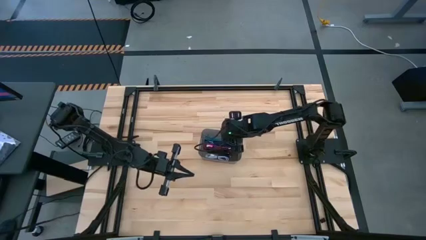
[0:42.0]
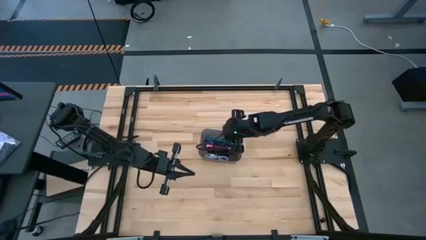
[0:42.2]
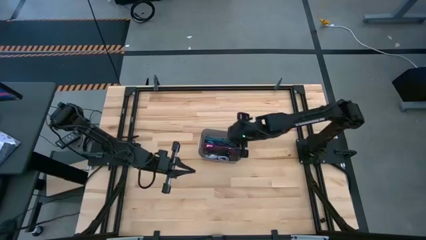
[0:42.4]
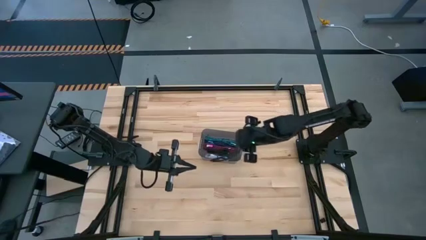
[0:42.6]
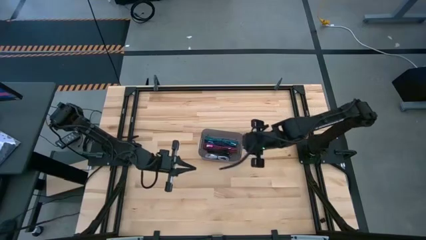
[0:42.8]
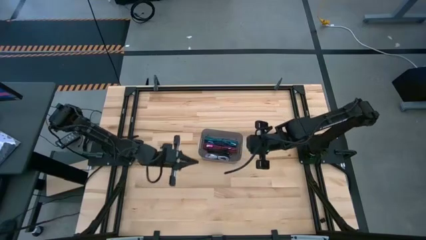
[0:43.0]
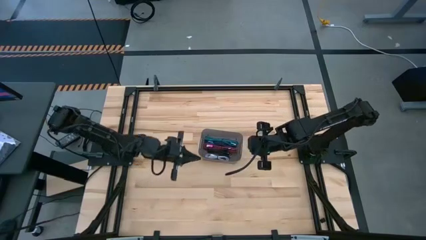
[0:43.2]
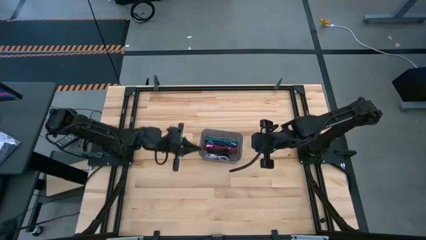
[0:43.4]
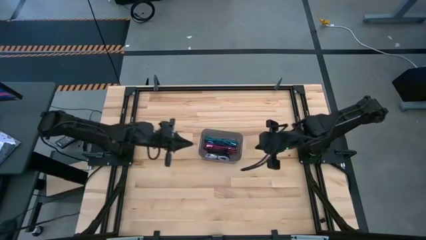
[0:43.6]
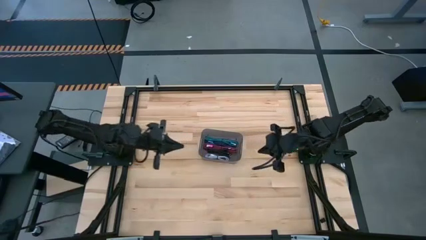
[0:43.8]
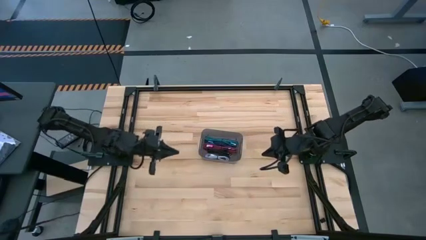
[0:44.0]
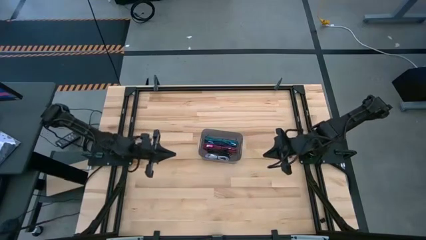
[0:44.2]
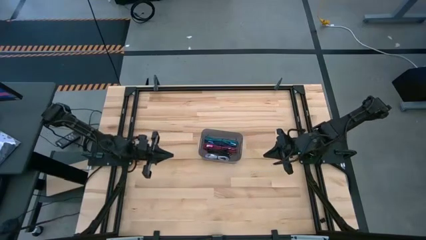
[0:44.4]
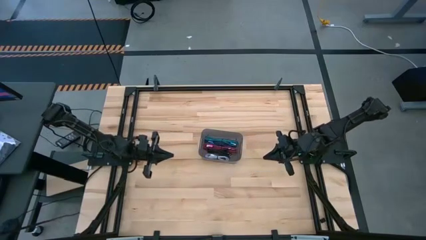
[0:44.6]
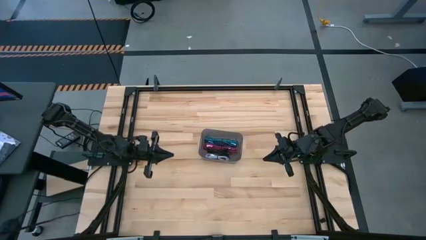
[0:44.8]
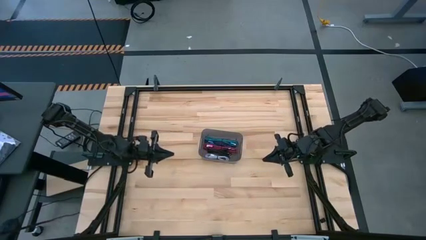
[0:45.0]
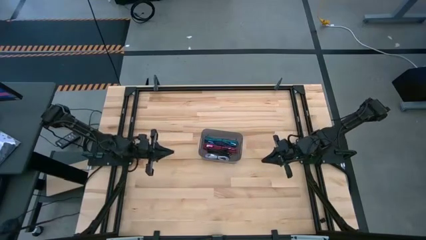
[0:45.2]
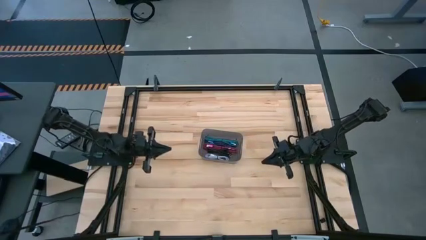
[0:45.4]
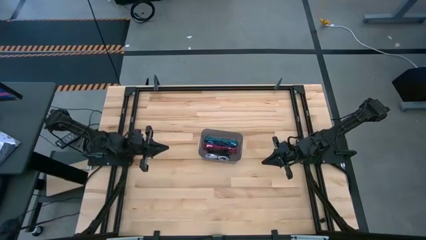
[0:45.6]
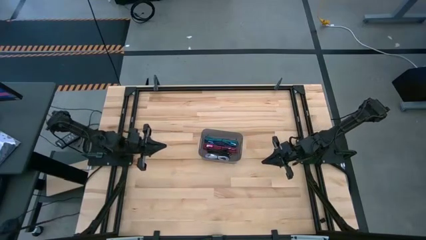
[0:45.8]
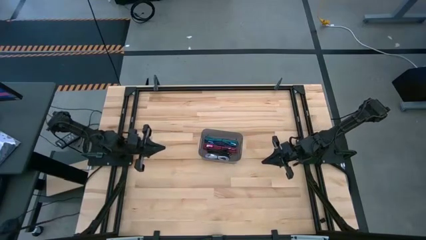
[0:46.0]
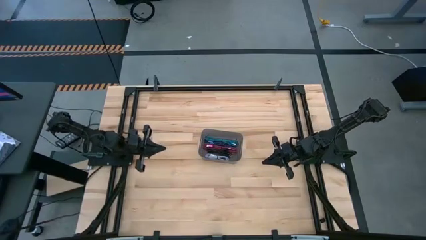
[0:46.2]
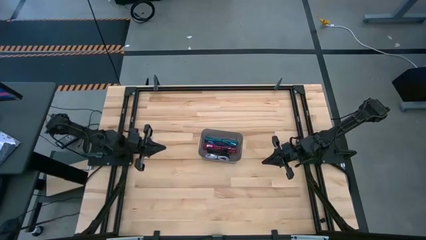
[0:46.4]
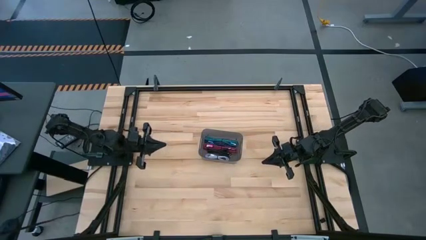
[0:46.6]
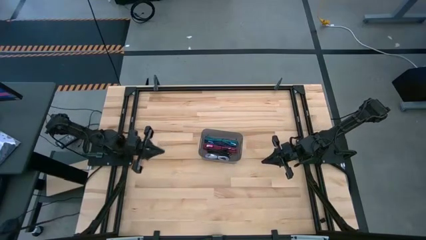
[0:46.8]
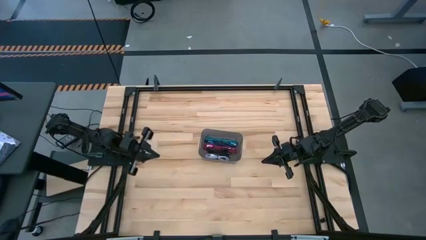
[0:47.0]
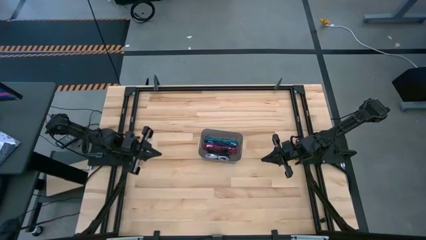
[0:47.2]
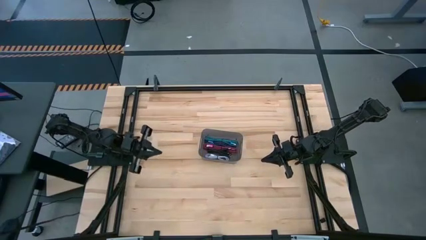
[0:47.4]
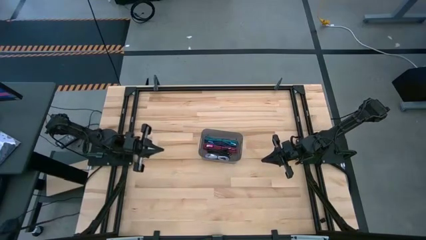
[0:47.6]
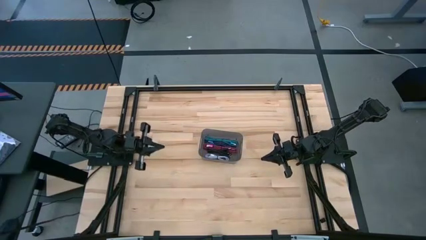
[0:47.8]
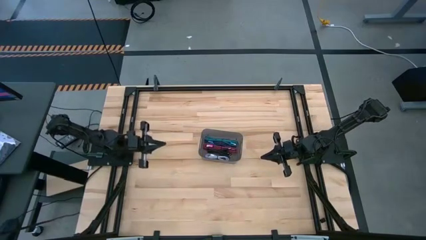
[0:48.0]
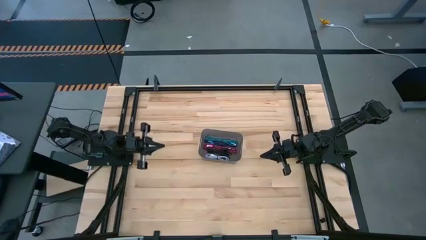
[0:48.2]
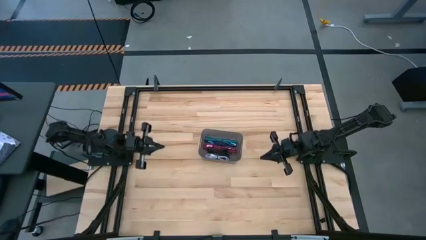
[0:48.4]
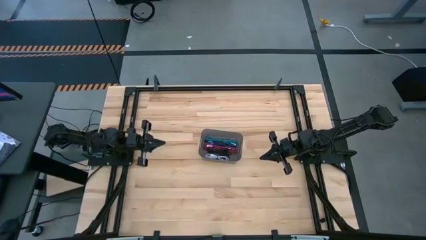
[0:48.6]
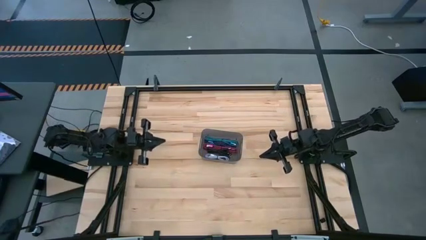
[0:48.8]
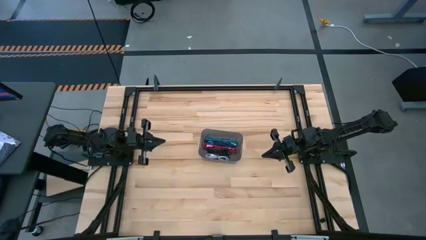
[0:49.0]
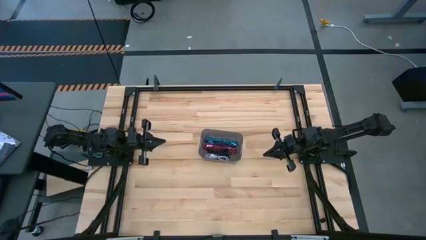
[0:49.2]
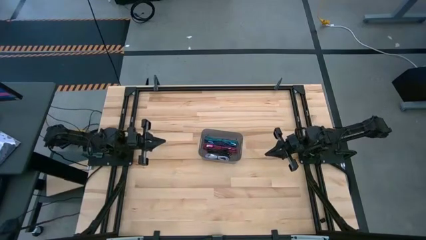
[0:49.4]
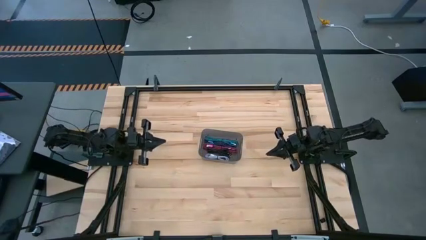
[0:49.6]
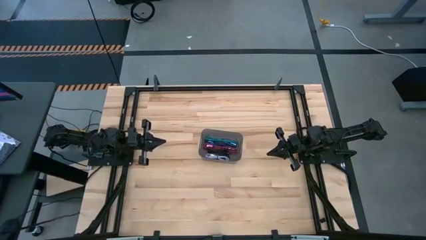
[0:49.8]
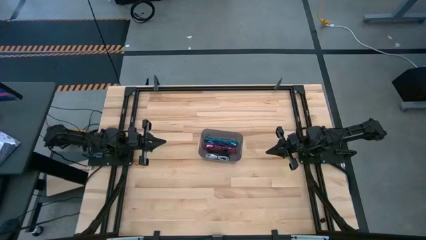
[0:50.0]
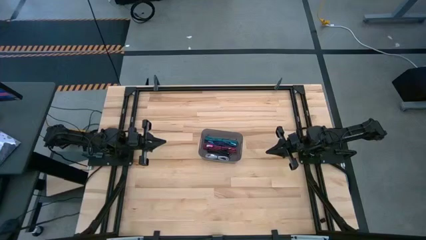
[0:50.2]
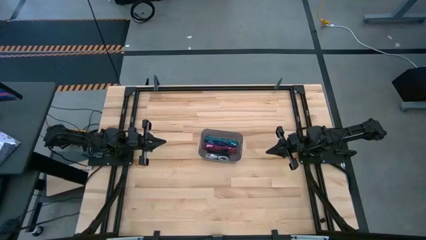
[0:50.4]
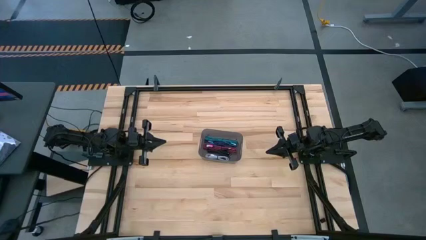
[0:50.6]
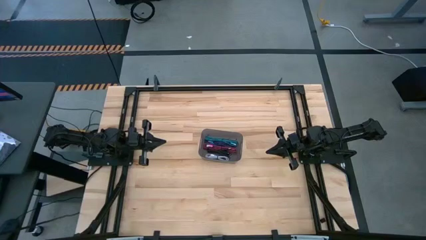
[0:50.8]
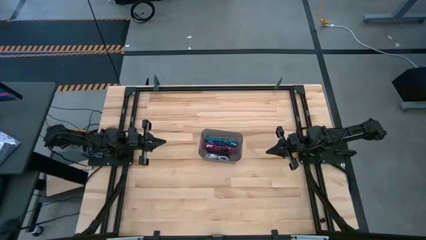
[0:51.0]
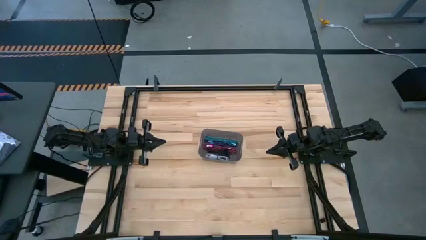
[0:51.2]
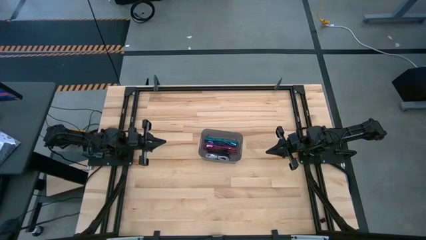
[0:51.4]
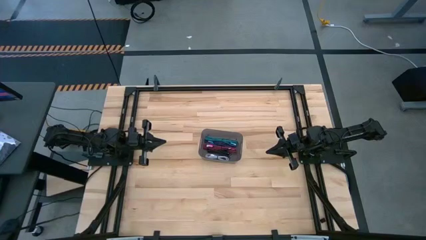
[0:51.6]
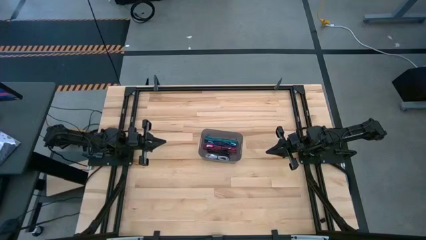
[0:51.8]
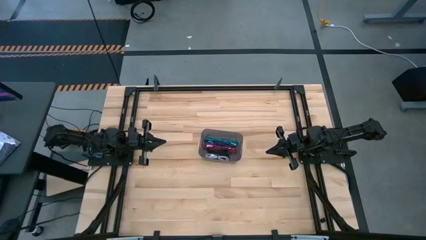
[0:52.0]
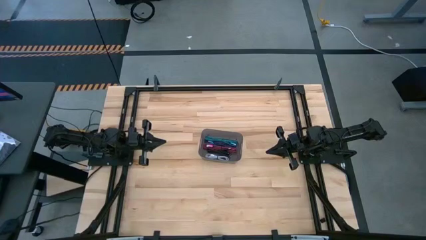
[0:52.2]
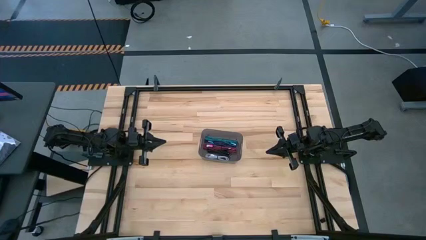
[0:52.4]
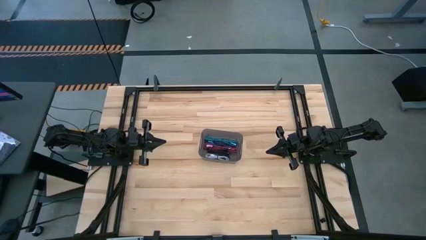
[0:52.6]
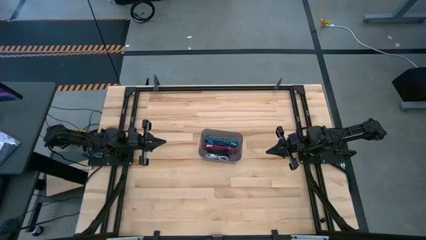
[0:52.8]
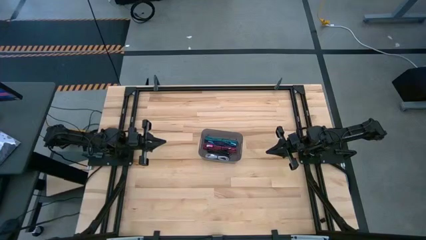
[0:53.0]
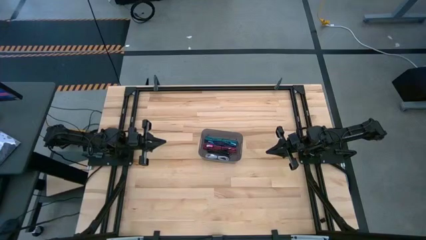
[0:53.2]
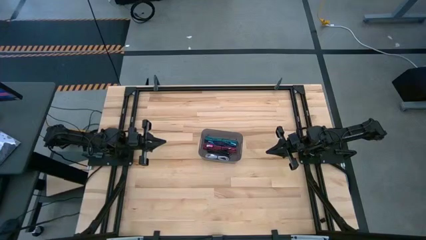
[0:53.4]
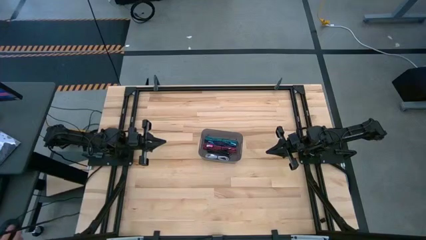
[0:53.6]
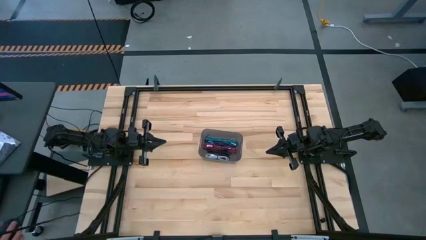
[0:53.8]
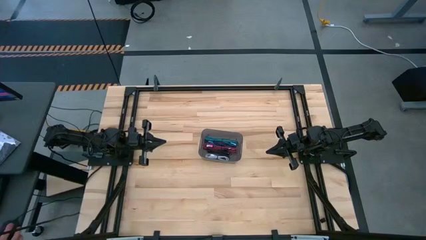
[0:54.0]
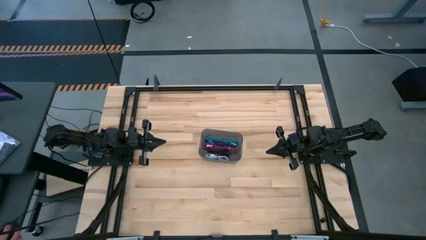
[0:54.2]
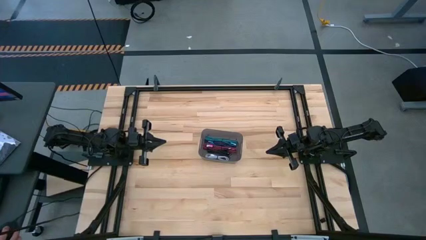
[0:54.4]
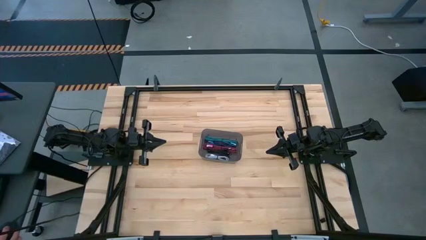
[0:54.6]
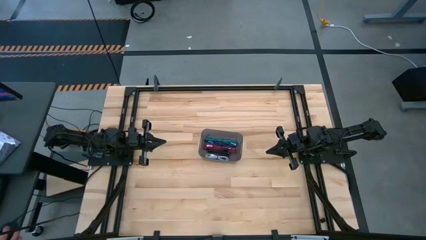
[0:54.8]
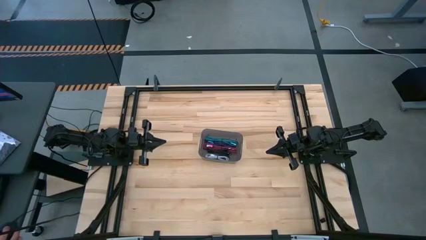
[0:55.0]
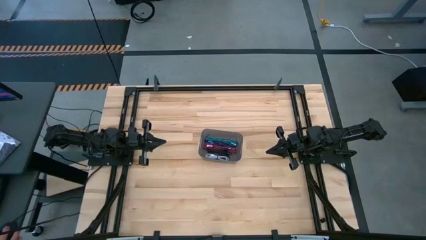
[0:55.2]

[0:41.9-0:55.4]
Task: Pick and place USB-C Cables
Return to Home Position
